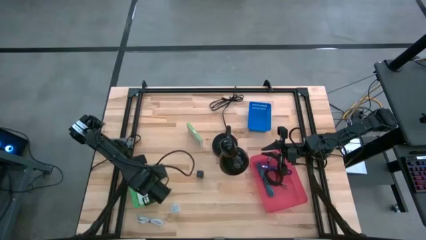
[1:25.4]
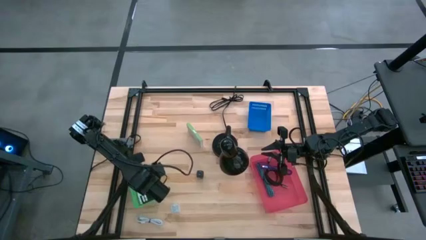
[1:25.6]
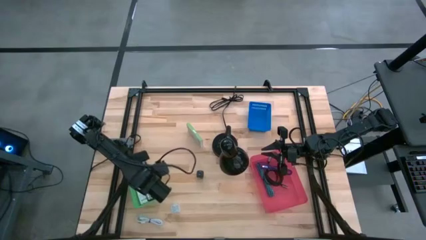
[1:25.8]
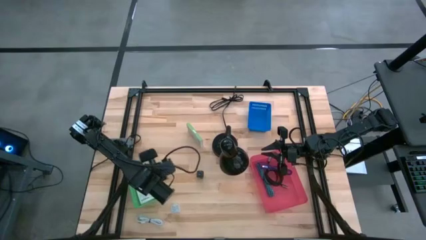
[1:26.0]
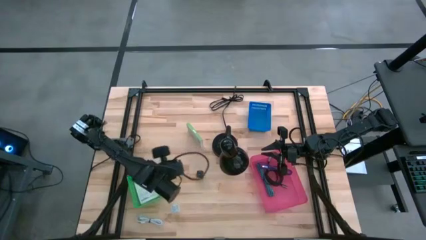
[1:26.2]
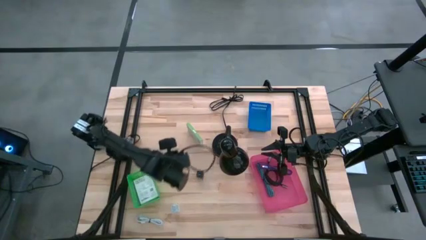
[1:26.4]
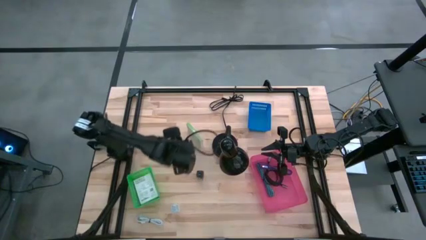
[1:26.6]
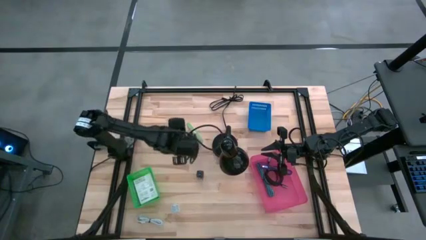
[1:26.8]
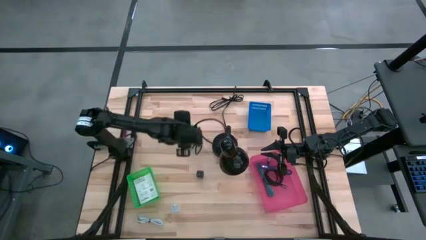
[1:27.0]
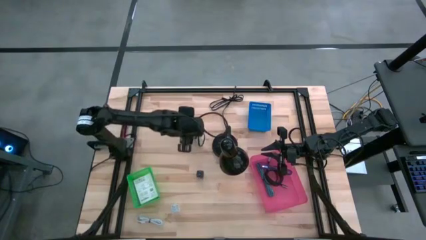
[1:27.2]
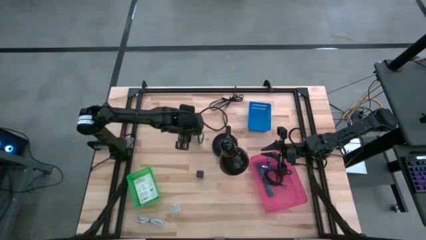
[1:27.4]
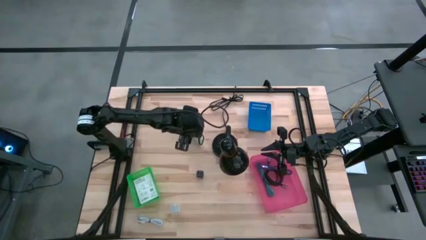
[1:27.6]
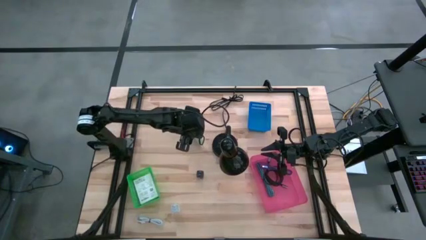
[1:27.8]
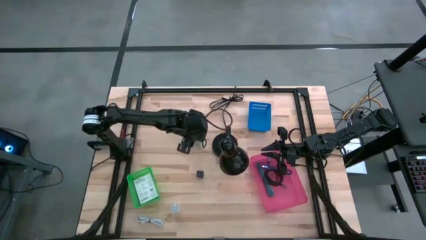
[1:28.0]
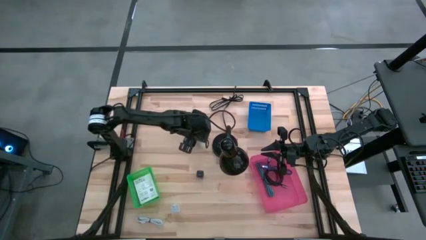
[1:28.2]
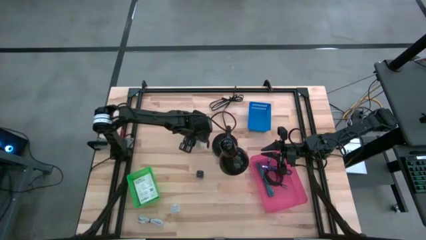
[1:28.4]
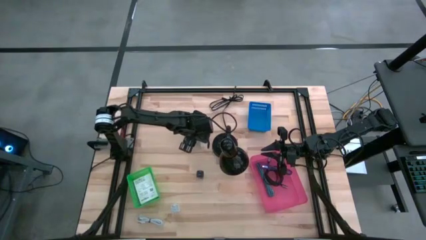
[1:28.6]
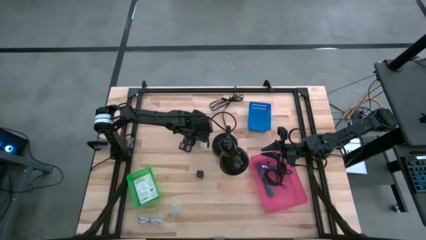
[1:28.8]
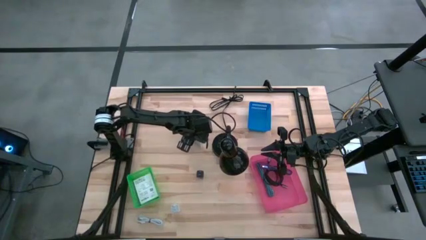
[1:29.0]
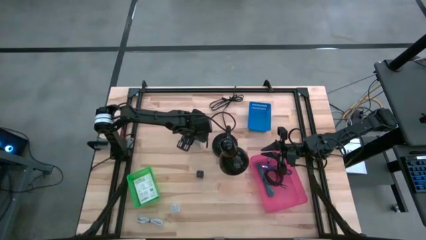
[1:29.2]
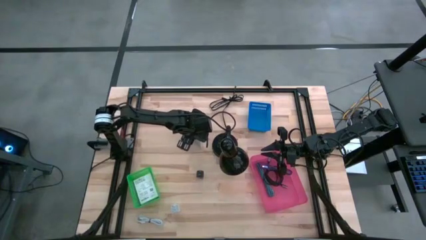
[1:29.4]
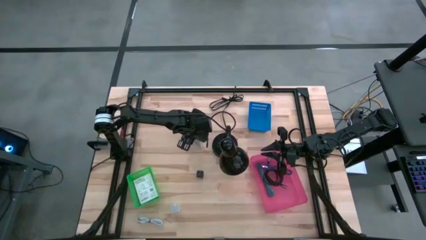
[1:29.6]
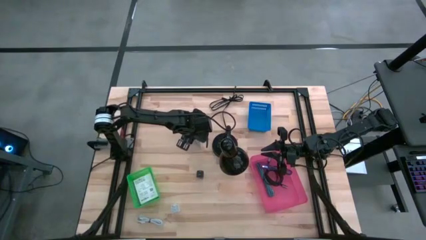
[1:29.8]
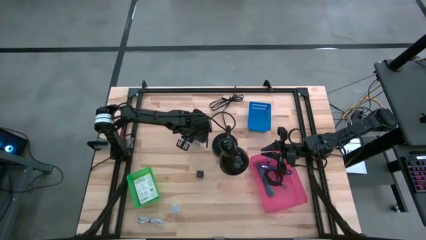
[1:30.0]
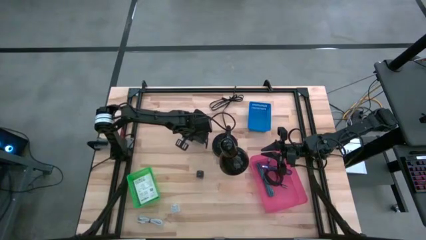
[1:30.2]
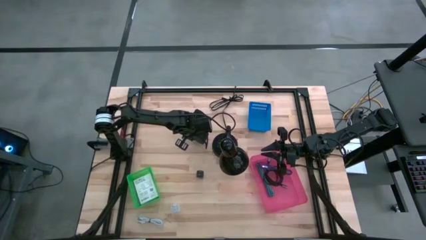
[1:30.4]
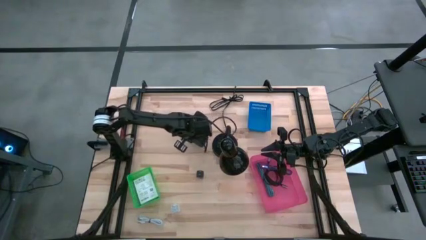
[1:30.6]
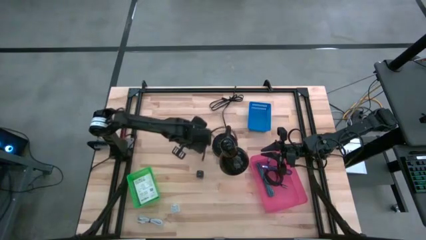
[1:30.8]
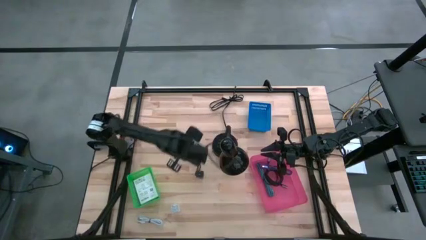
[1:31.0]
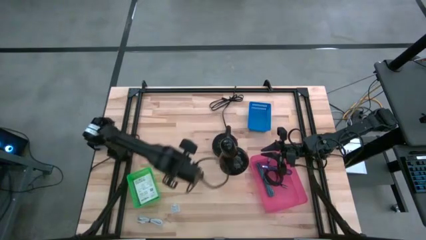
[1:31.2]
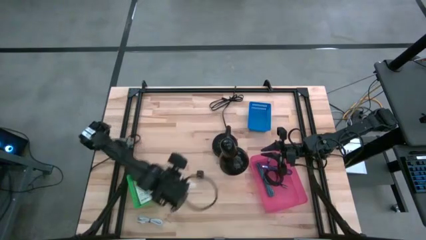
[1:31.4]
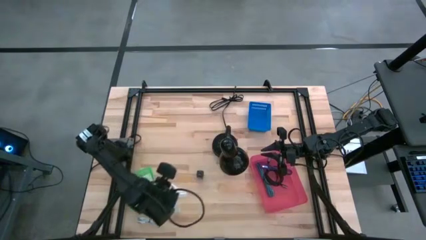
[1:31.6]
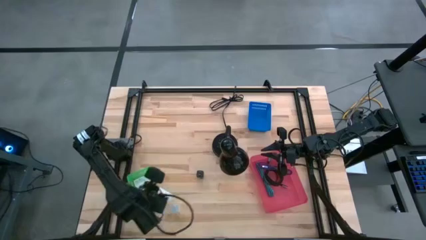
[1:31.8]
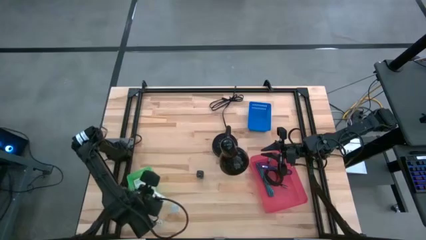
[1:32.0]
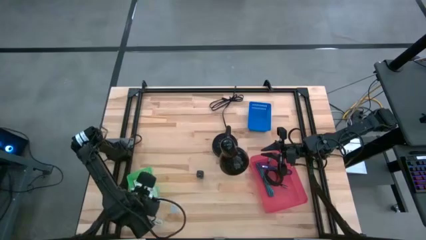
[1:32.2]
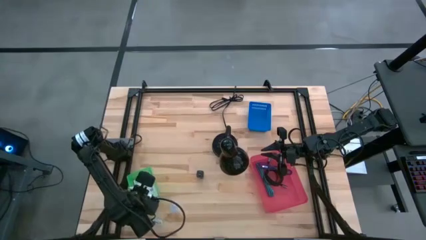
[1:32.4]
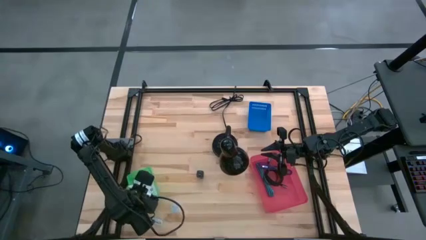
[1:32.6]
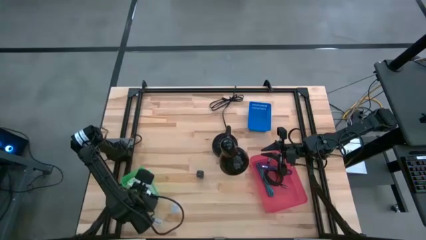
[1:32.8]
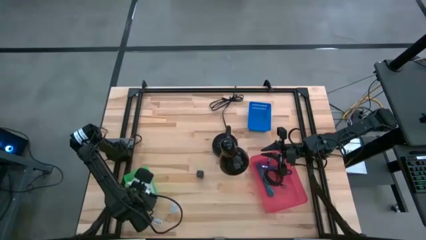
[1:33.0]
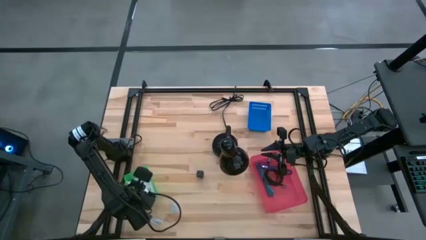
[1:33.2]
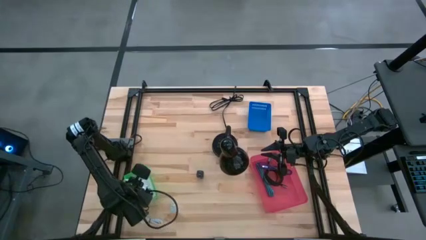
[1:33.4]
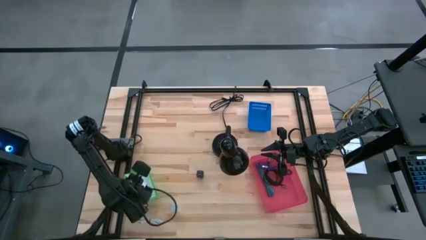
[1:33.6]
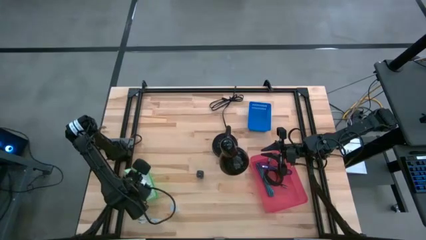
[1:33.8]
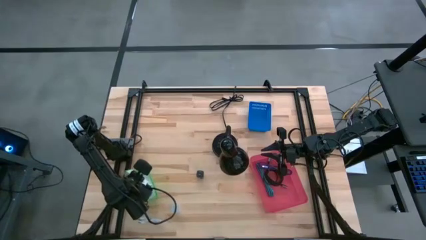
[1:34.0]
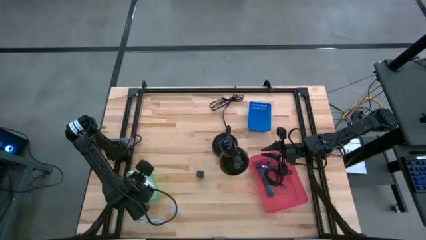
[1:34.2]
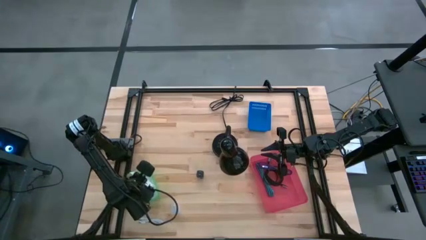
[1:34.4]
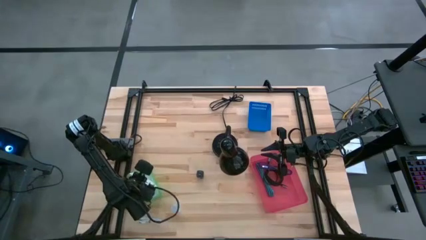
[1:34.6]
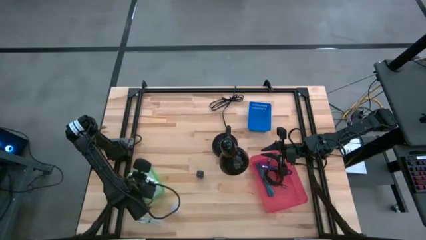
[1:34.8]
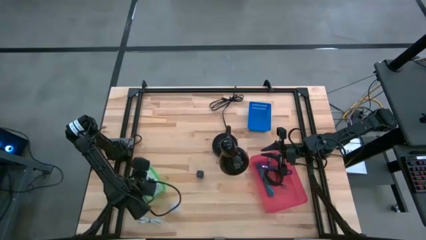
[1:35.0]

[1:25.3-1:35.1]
Task: Pick and place items into bin
Put the white card reader box into the green bin

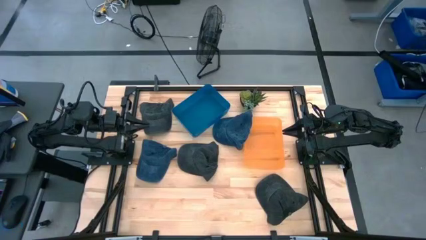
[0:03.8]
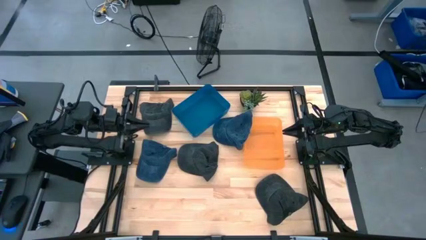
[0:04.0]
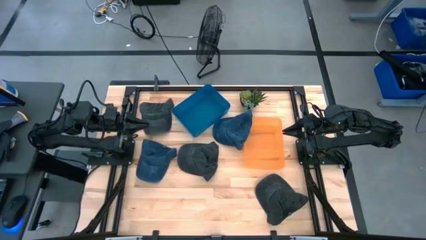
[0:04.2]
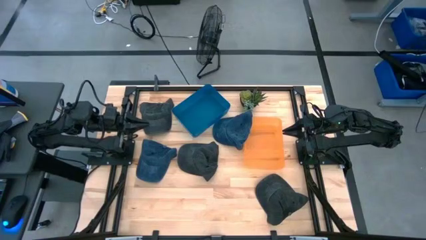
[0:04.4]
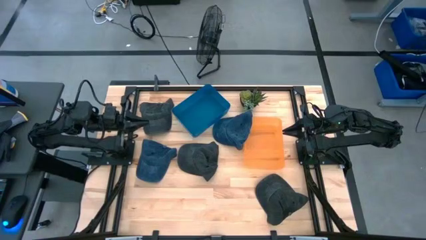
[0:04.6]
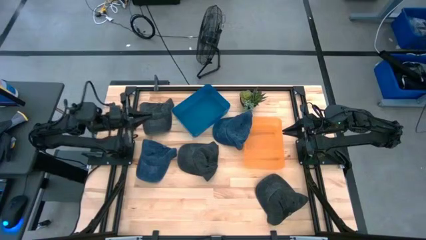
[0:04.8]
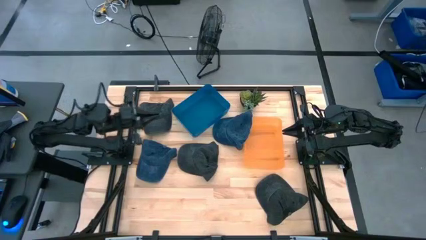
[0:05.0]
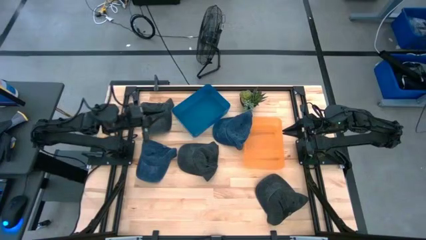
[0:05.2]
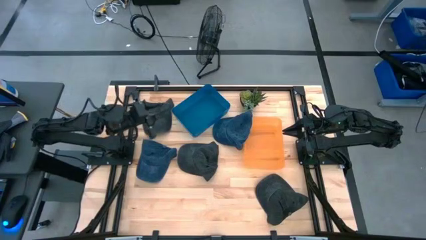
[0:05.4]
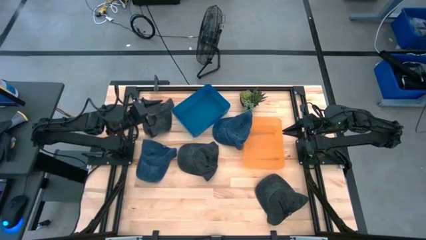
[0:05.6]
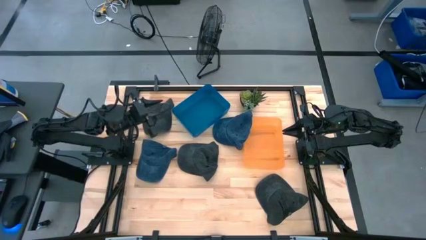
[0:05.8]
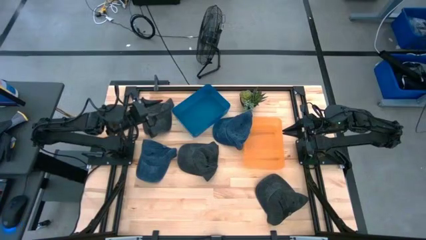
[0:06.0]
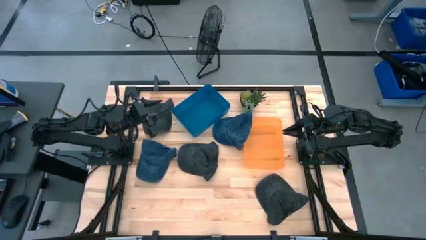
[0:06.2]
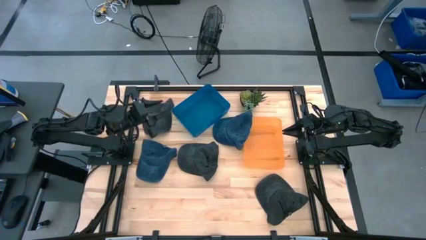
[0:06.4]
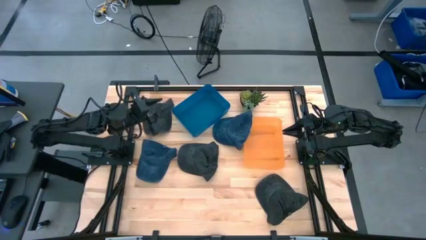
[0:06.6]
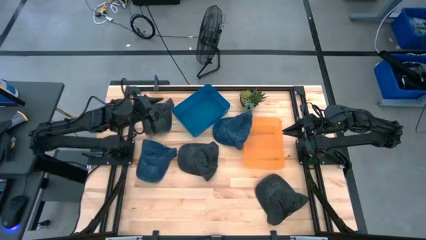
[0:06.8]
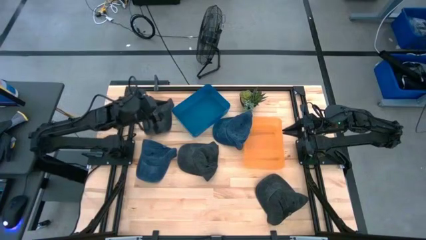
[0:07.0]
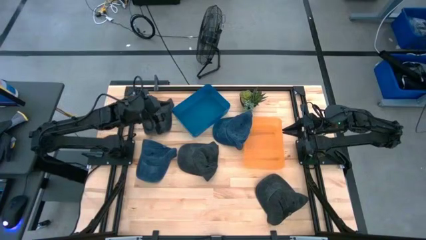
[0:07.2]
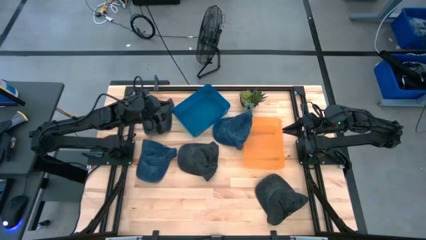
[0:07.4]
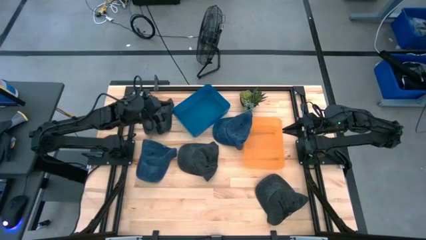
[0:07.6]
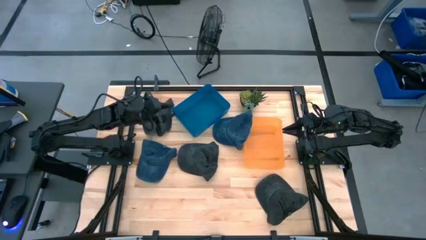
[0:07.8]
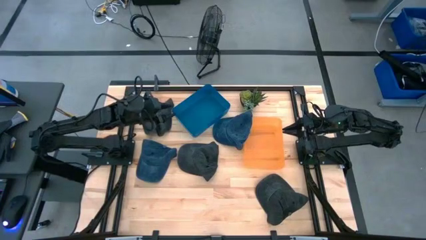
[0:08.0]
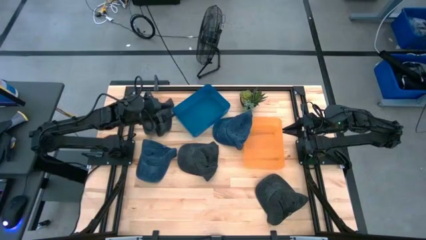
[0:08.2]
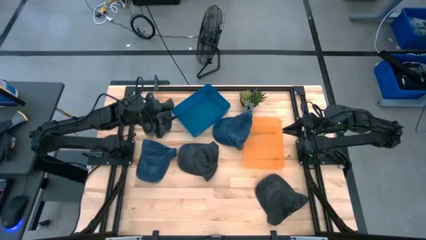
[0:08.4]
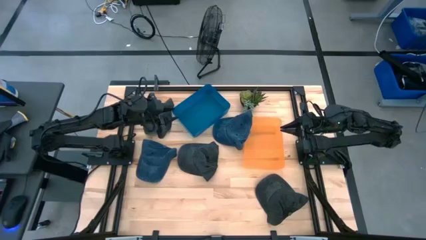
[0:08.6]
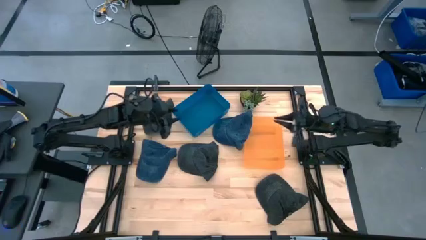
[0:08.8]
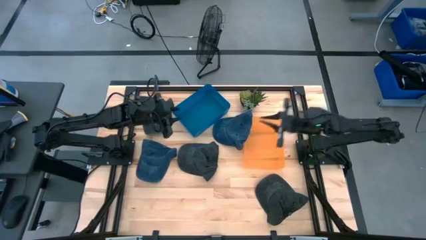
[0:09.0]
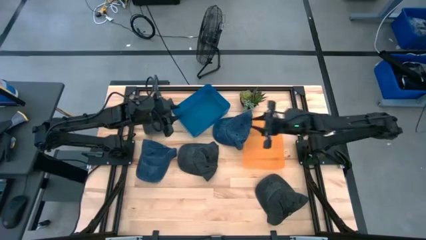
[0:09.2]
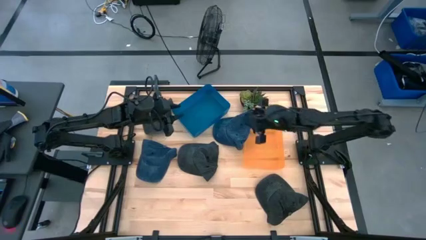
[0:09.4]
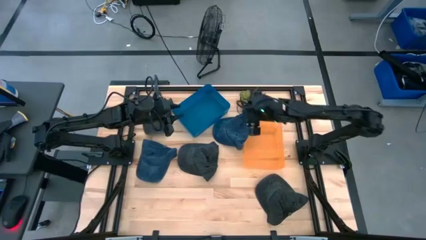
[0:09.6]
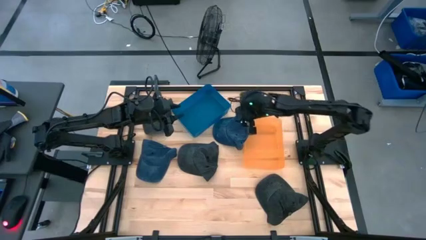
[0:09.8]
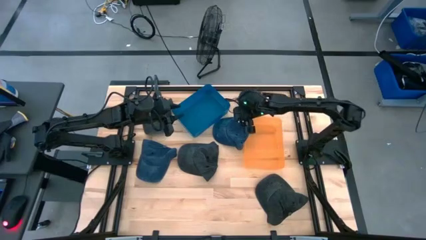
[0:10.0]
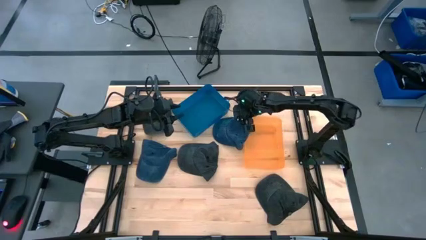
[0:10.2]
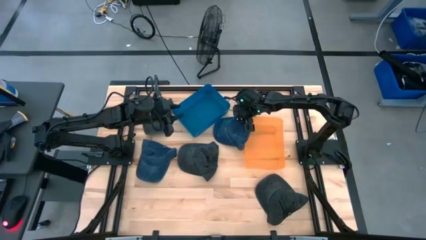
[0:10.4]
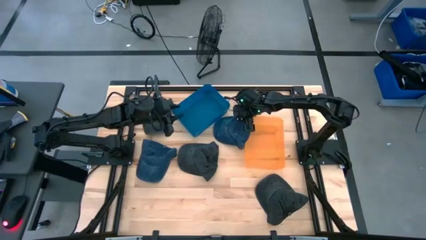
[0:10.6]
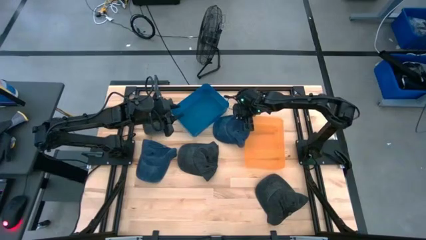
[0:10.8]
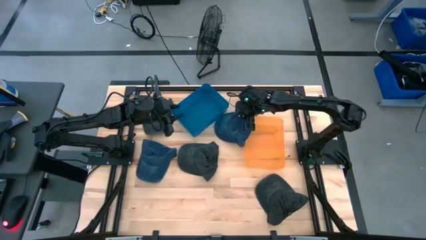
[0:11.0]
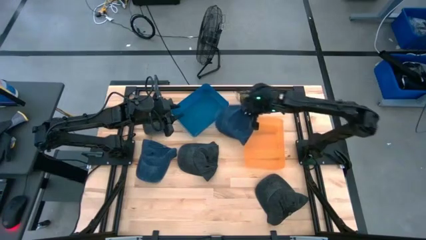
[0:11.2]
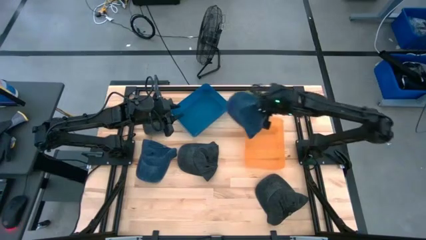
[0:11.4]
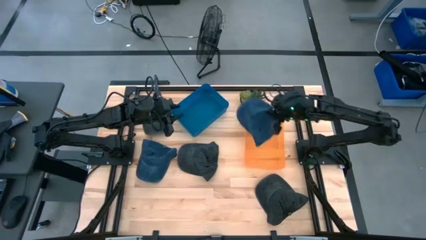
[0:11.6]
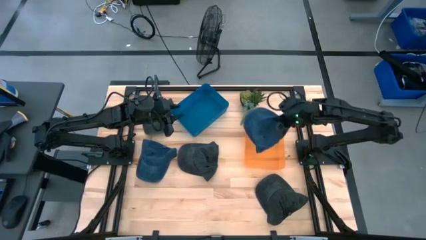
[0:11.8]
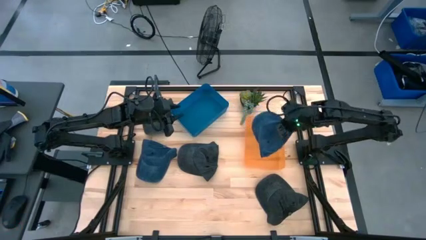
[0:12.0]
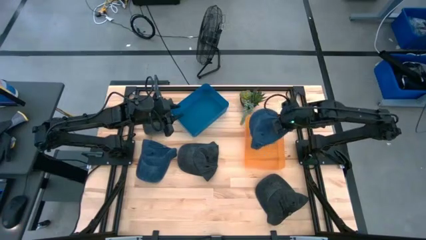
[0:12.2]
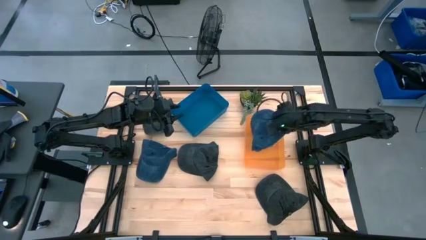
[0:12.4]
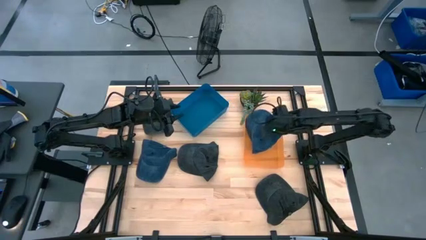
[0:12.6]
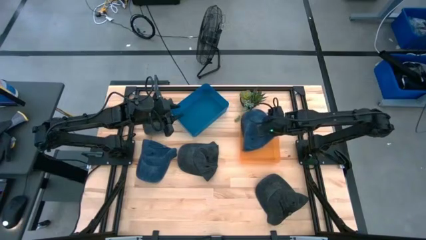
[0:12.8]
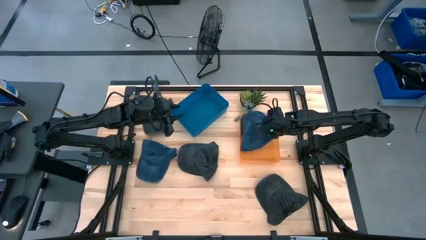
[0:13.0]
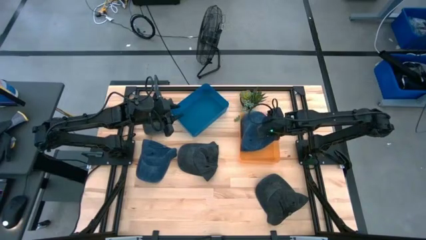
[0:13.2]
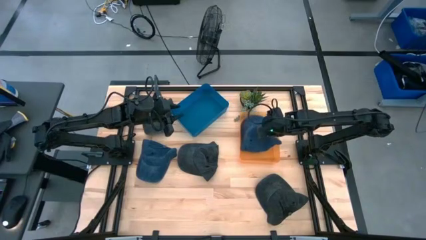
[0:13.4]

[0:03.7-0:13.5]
Task: Pick & Place hat
Put the right blue cap into the orange bin
